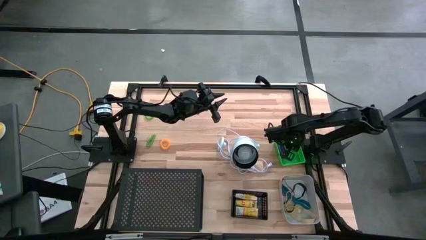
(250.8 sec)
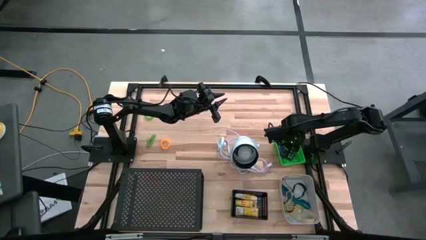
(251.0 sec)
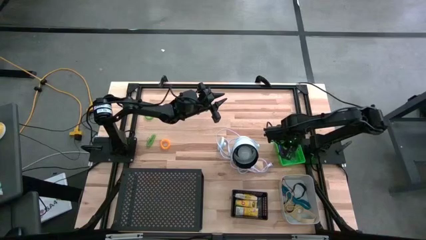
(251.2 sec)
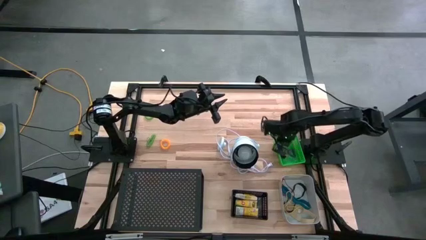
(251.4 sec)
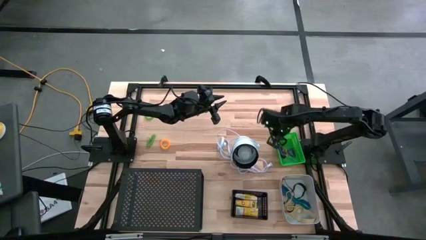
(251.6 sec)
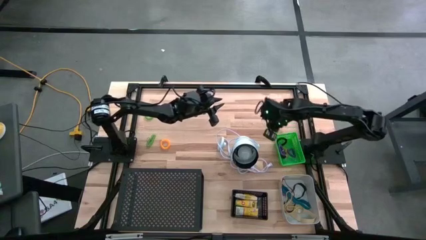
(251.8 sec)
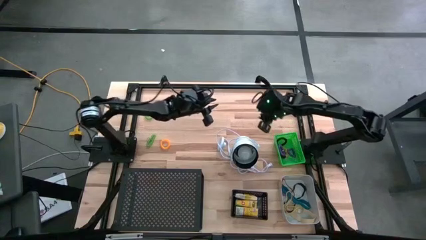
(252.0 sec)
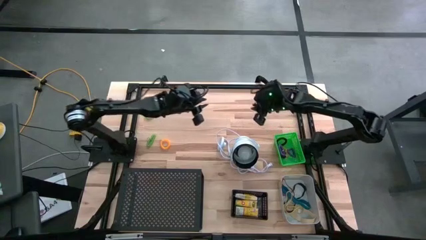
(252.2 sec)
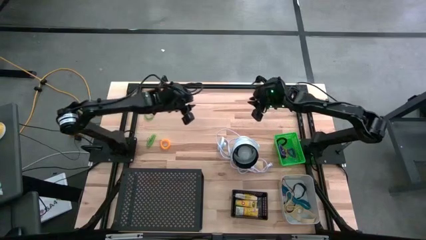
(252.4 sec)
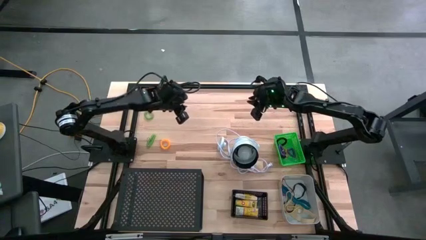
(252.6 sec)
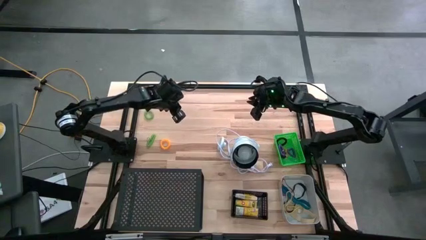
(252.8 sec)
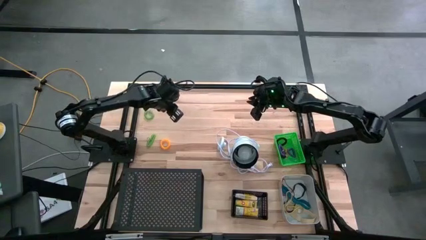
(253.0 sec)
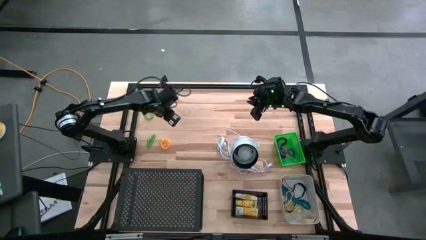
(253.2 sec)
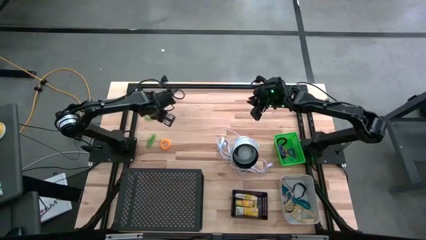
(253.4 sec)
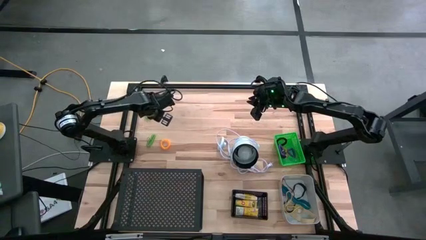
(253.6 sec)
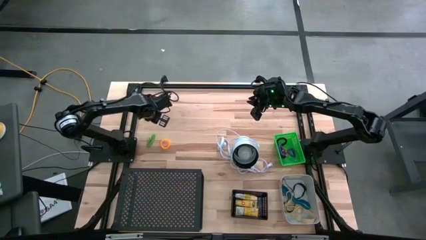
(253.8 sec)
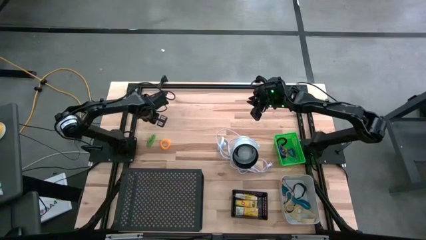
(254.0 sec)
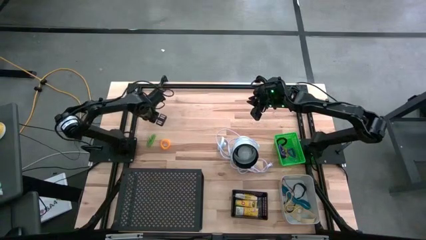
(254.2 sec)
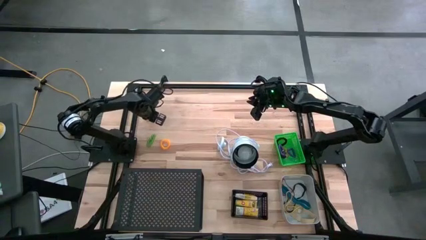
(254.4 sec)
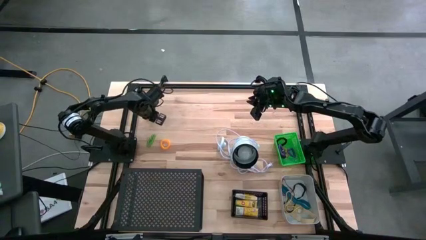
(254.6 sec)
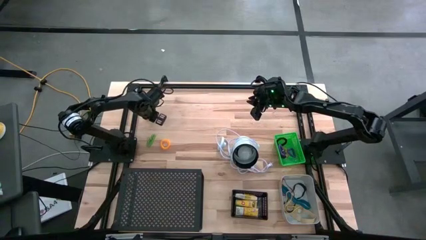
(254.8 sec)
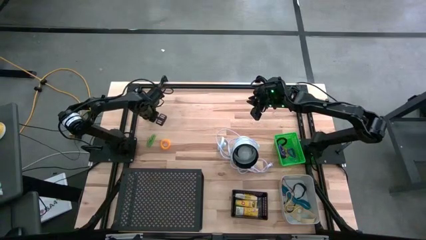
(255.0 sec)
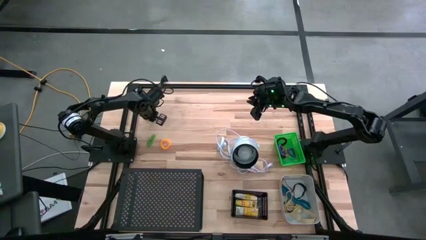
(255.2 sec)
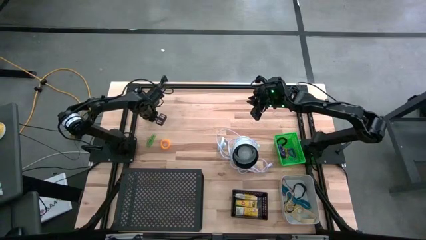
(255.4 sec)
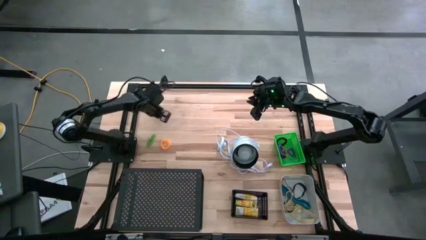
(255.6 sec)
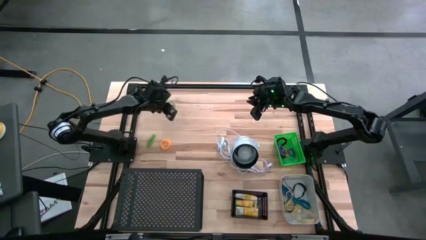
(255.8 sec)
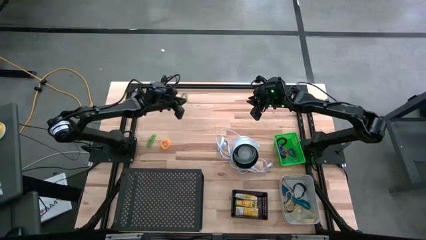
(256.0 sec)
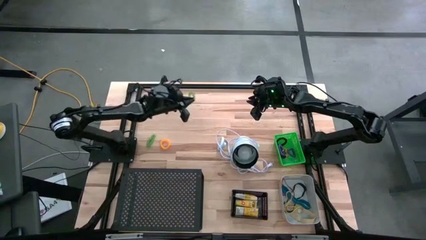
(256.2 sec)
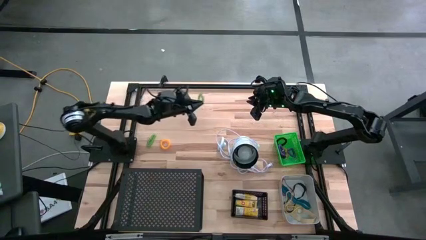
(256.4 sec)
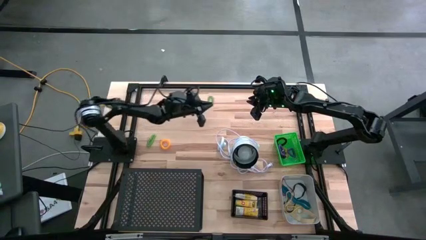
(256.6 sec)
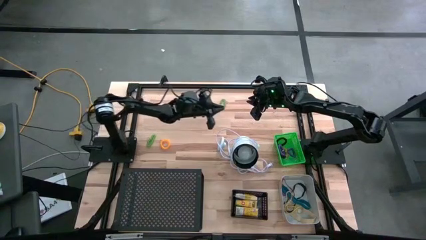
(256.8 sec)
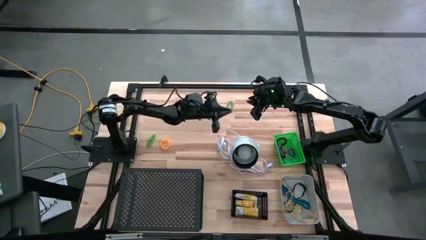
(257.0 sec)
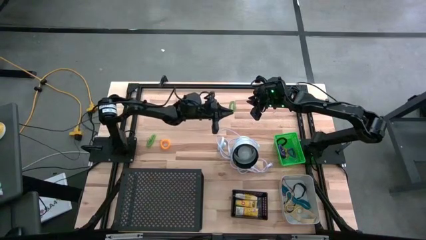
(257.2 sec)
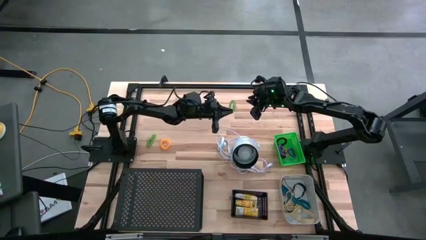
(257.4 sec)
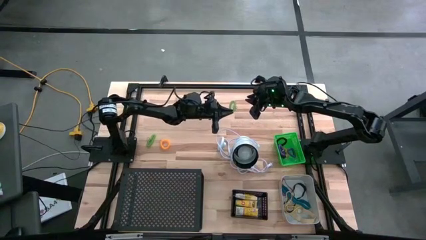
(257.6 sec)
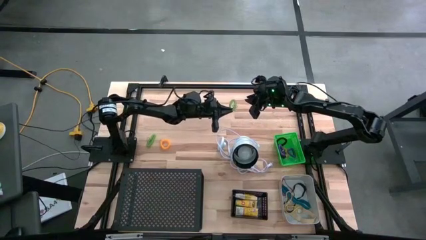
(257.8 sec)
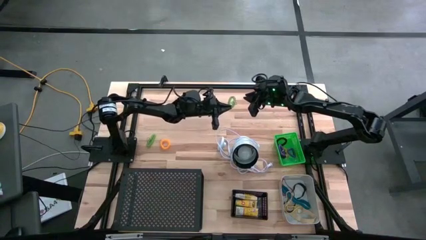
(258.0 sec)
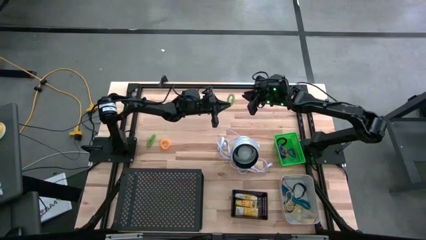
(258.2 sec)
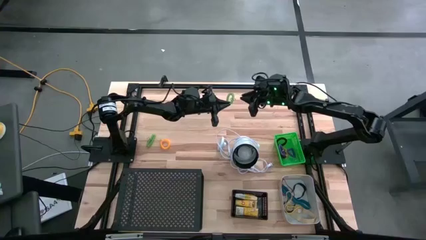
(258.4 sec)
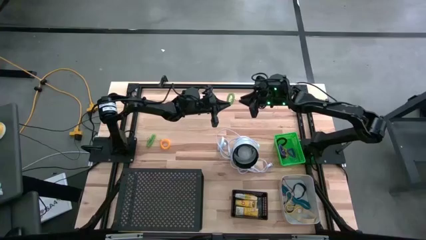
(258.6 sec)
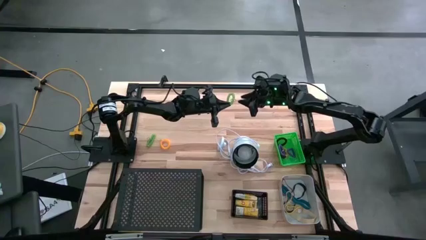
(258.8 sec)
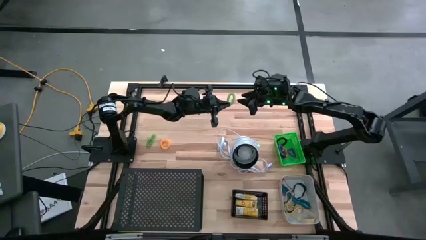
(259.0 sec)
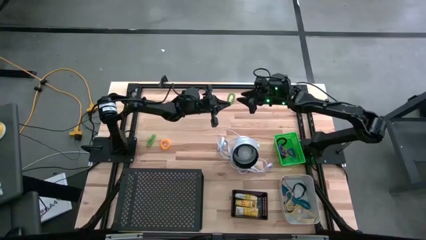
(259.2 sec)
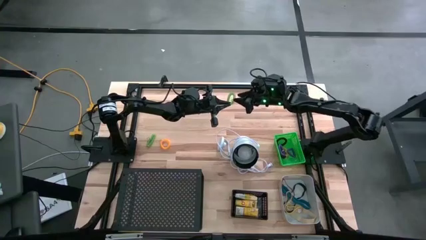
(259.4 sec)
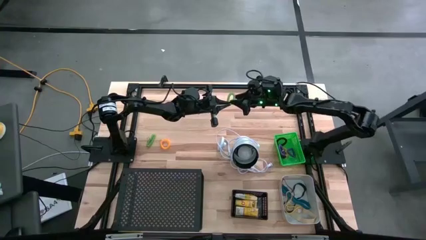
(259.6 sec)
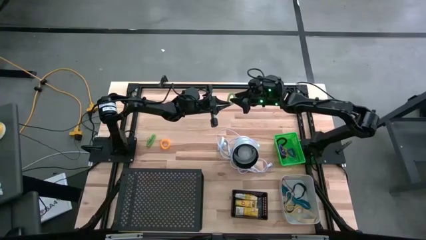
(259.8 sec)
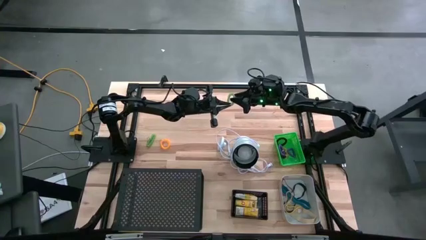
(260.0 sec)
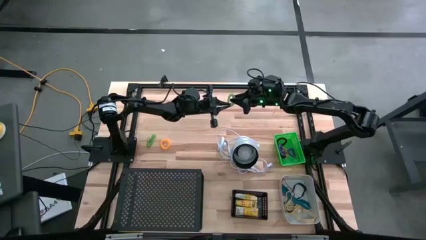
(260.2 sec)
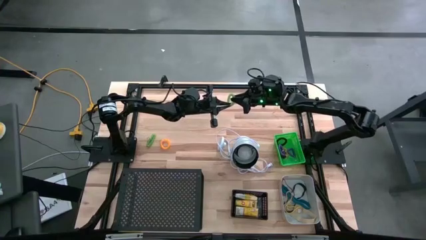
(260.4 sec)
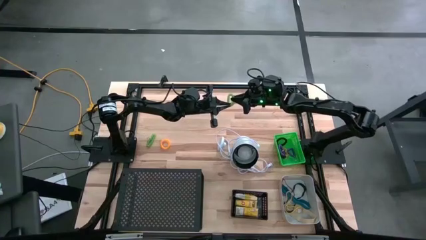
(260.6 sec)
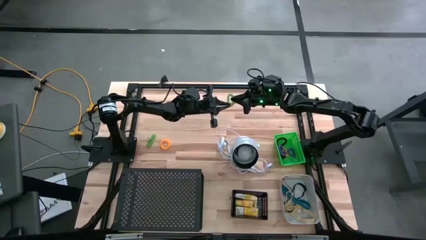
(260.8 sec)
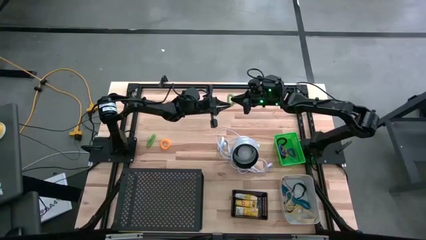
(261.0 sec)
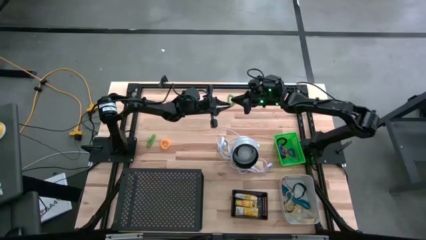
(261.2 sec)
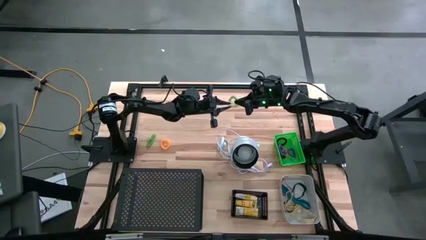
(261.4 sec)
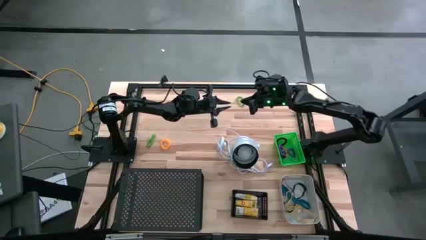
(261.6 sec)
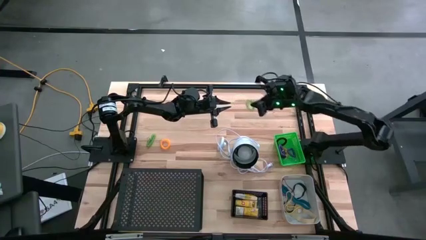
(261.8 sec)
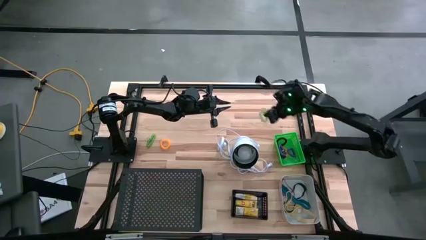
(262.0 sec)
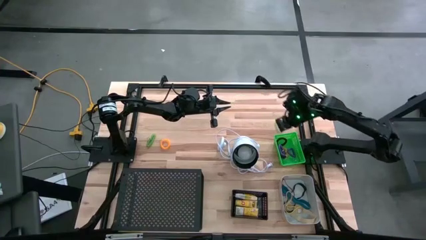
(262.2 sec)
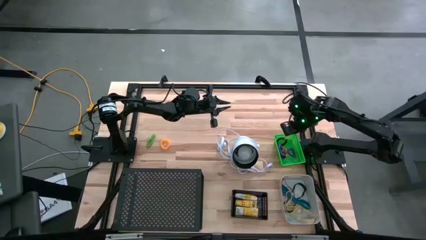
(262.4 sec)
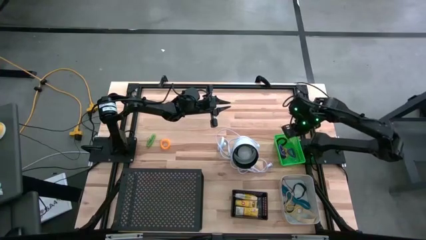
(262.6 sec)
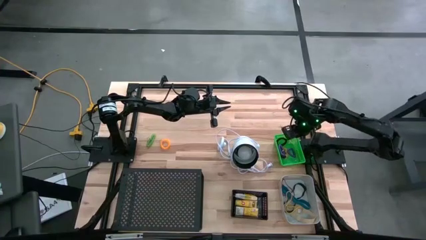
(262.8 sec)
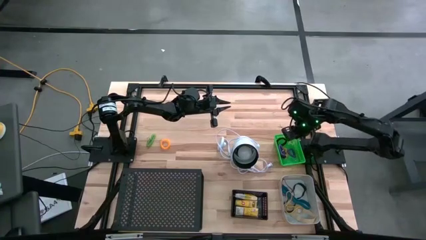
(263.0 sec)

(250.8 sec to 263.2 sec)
Task: Pick & Place Office Desk Supplies
Put the top green spring keychain into the green bin

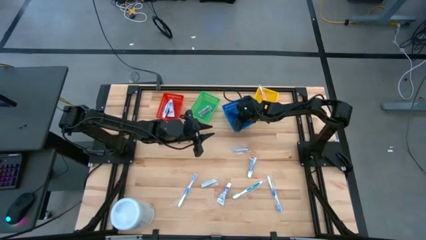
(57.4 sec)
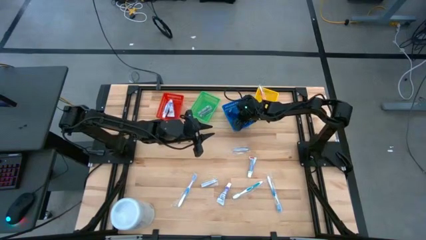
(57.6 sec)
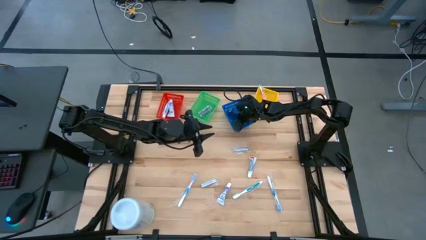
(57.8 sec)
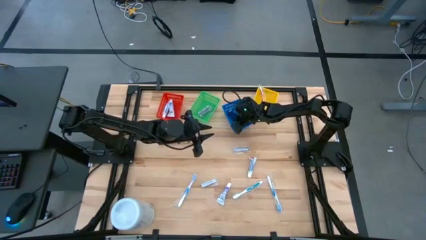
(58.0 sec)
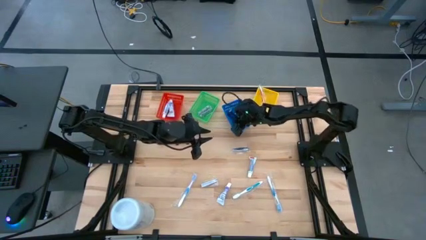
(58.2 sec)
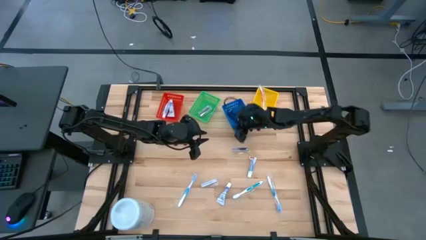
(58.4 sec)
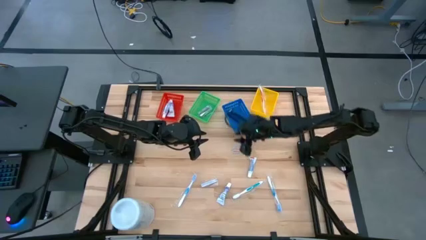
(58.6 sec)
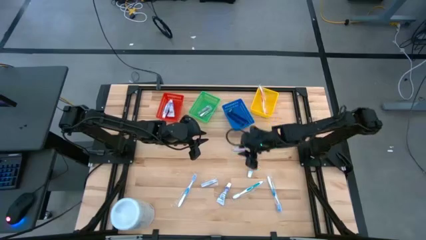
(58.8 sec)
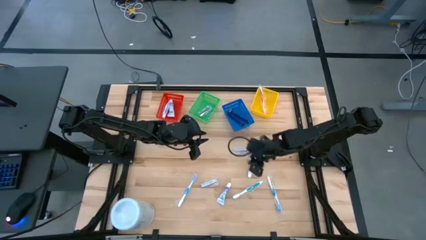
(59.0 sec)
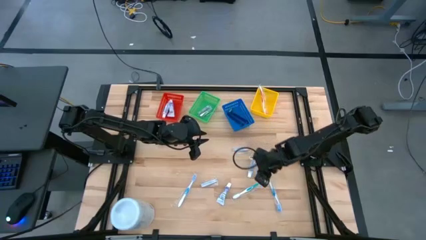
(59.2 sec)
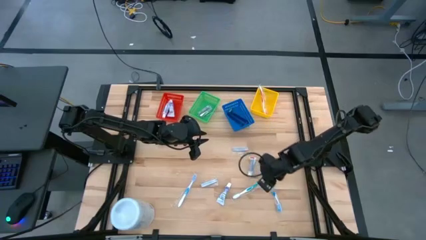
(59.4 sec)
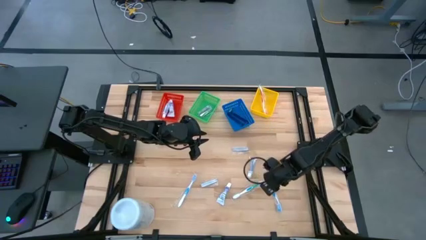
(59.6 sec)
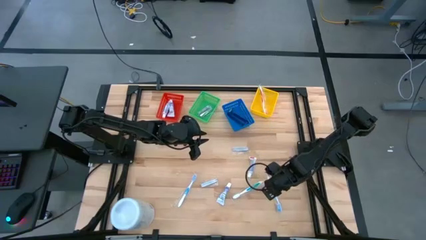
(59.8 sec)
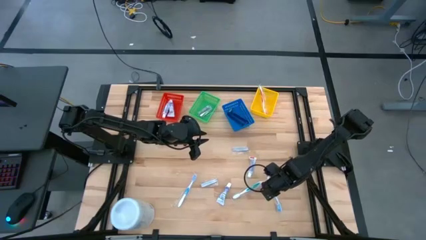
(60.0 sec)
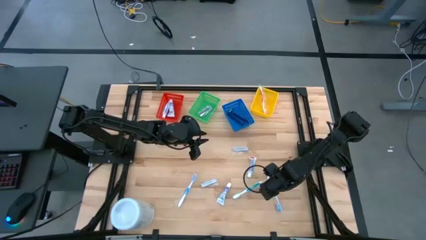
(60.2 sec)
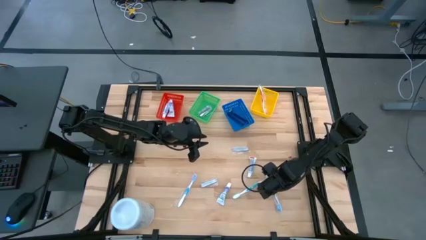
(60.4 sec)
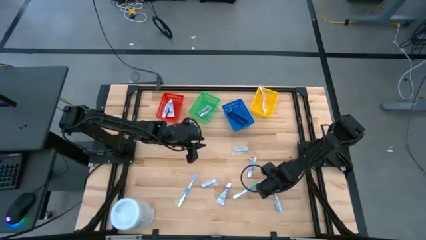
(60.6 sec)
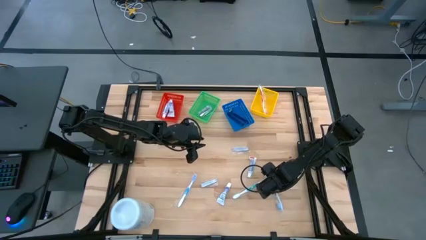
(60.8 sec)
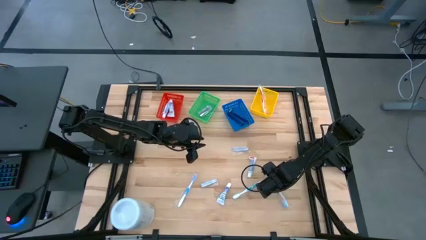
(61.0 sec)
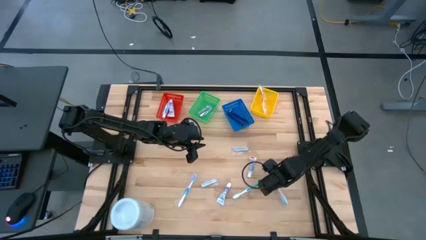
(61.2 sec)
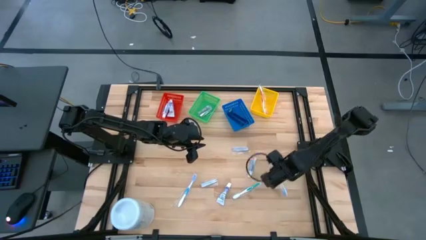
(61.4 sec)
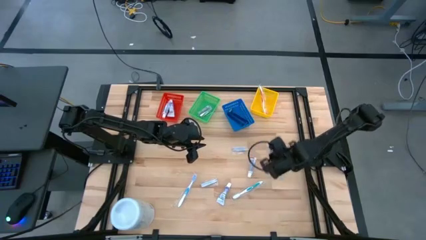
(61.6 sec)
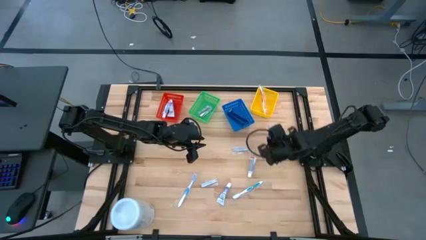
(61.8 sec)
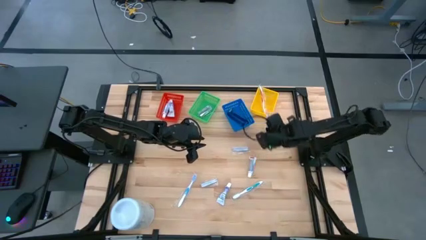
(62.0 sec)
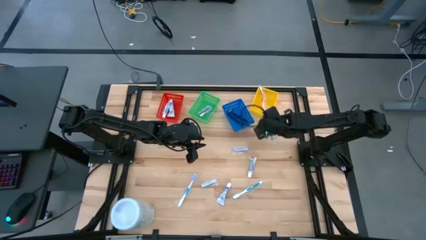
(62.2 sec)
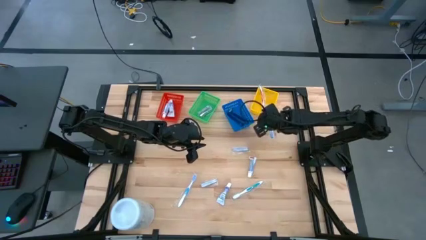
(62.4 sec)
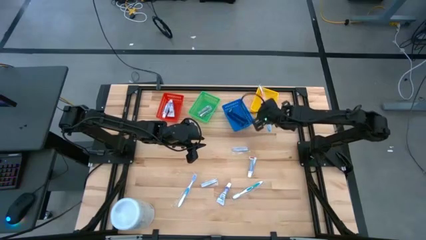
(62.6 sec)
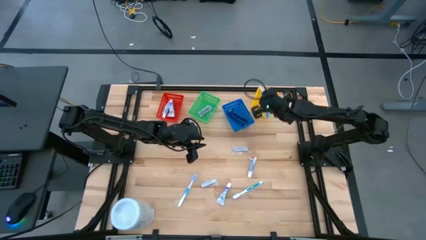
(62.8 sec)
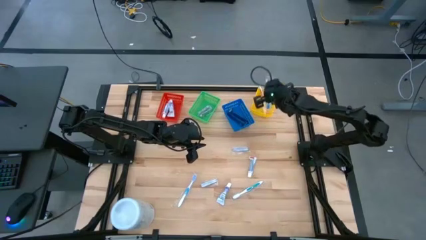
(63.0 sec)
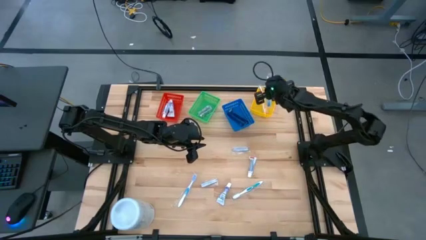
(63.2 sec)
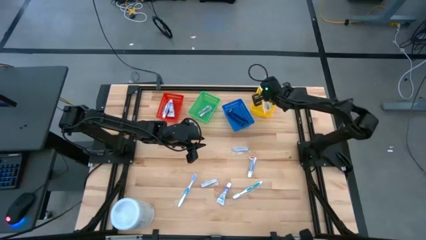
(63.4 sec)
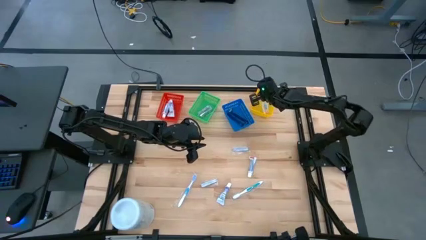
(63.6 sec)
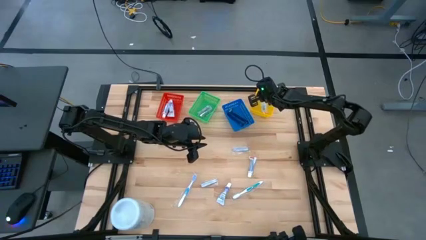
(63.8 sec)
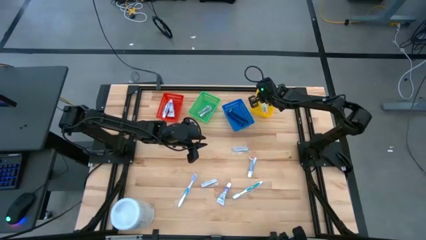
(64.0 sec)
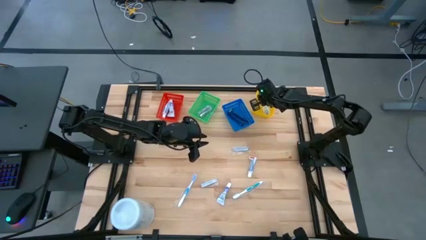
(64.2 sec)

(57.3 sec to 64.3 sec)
Task: Pick & Place Travel size toiletries
Put the blue toothbrush in the yellow bin
